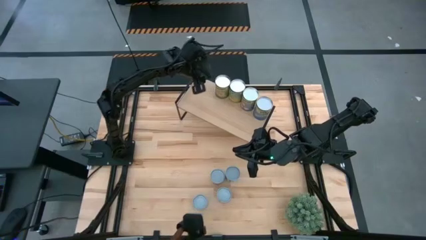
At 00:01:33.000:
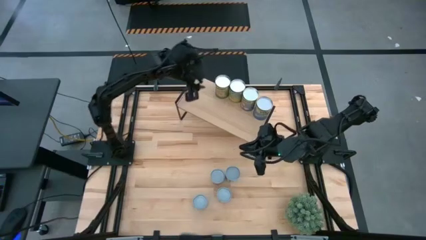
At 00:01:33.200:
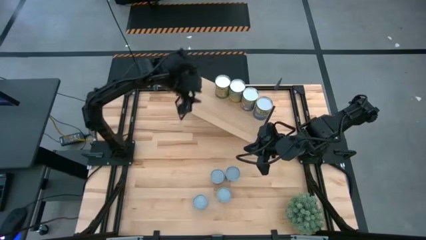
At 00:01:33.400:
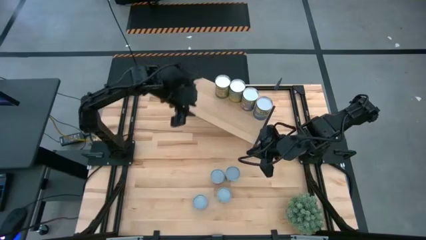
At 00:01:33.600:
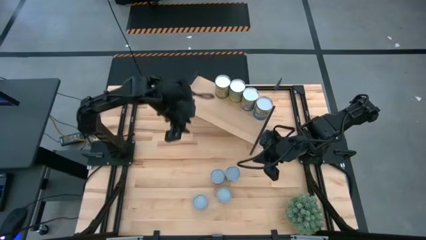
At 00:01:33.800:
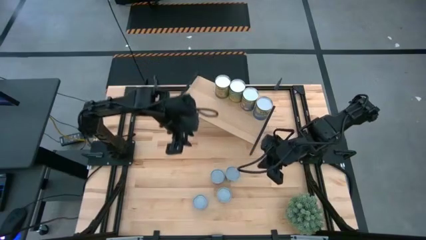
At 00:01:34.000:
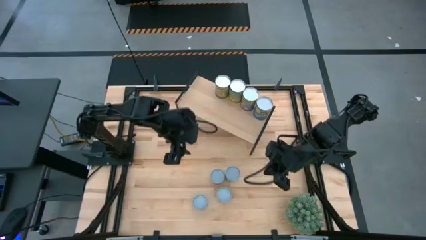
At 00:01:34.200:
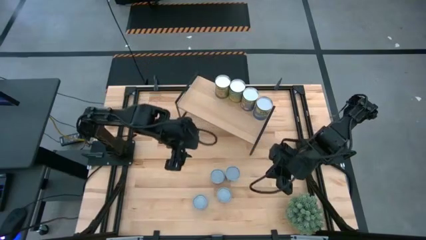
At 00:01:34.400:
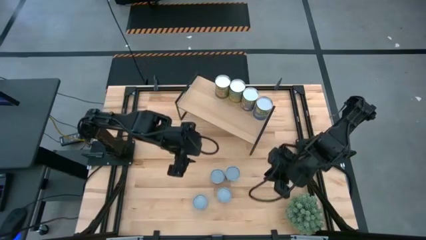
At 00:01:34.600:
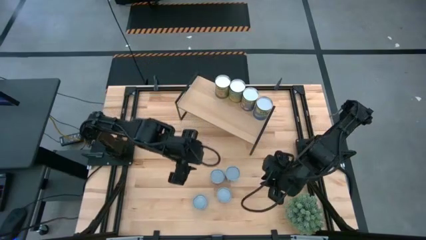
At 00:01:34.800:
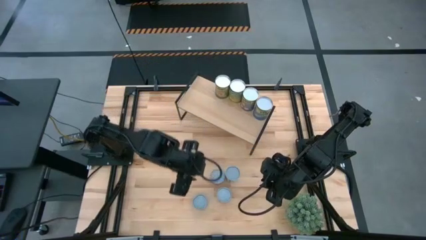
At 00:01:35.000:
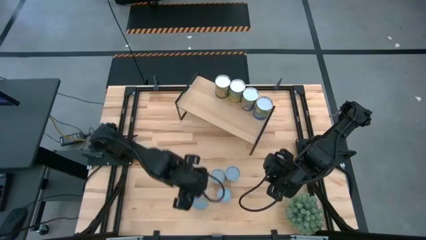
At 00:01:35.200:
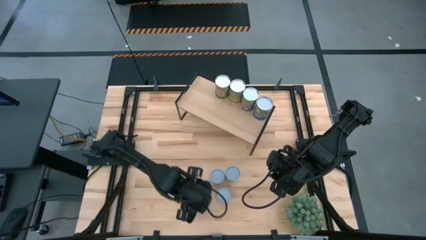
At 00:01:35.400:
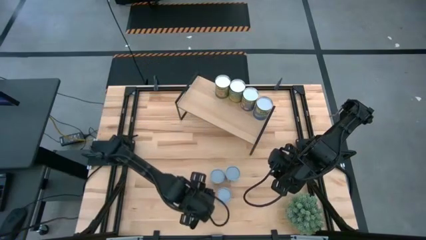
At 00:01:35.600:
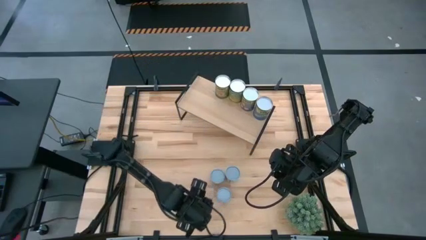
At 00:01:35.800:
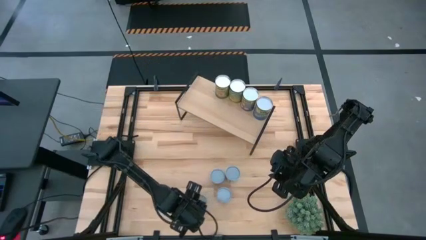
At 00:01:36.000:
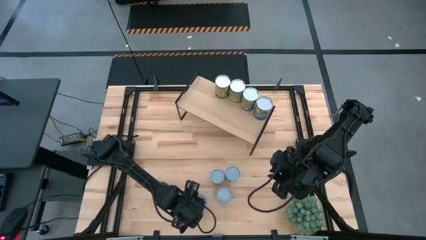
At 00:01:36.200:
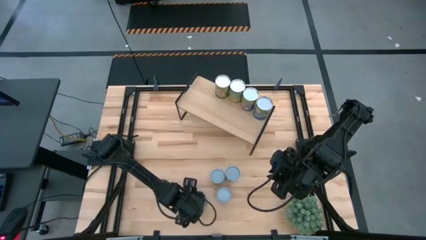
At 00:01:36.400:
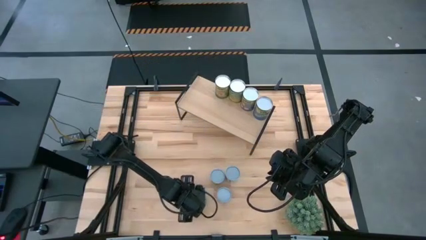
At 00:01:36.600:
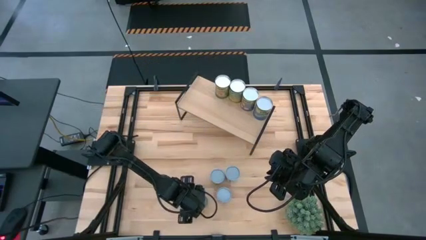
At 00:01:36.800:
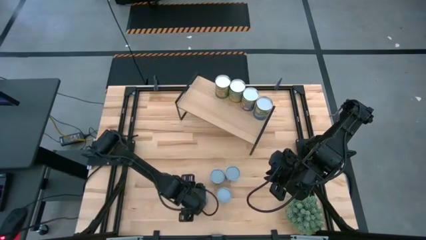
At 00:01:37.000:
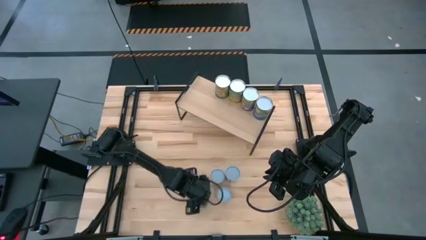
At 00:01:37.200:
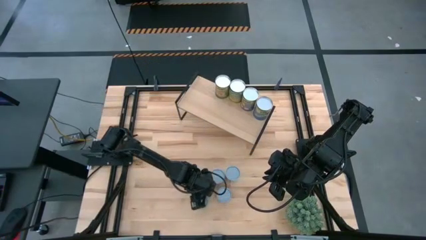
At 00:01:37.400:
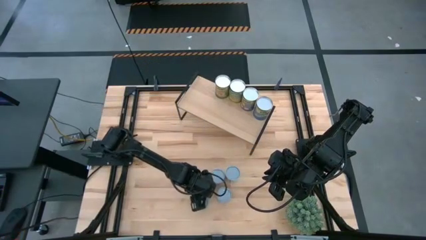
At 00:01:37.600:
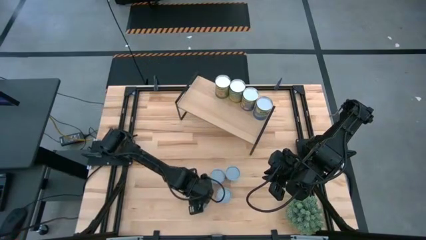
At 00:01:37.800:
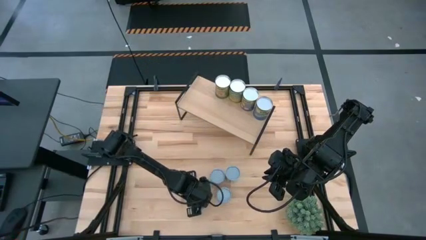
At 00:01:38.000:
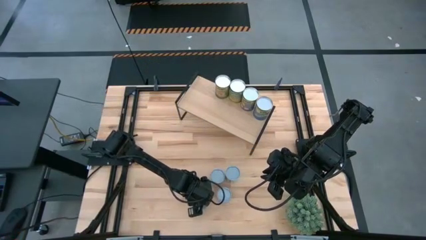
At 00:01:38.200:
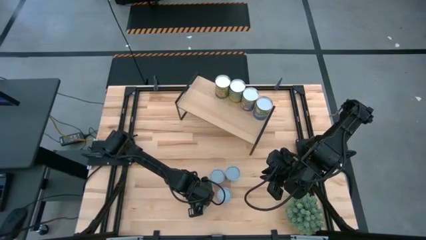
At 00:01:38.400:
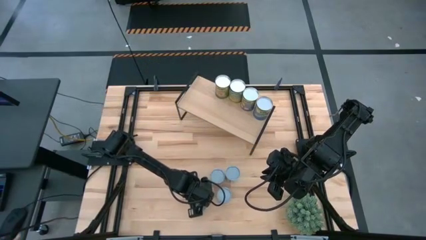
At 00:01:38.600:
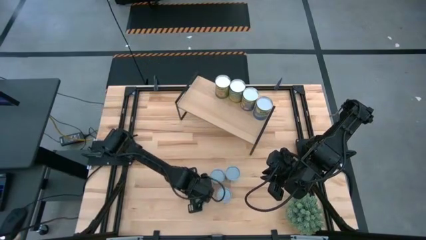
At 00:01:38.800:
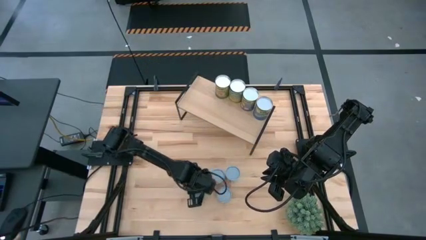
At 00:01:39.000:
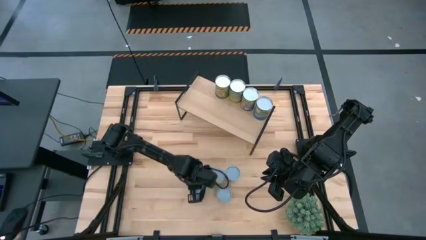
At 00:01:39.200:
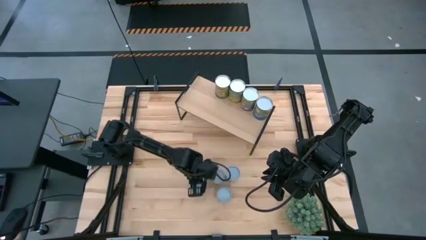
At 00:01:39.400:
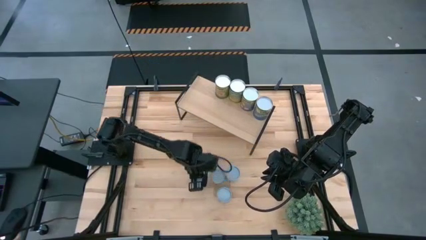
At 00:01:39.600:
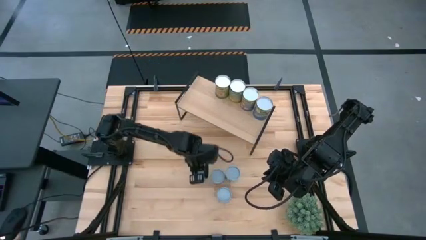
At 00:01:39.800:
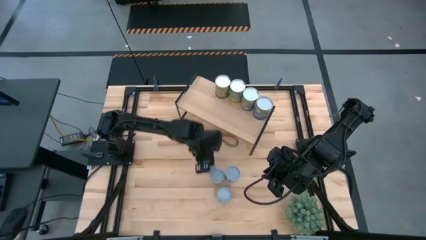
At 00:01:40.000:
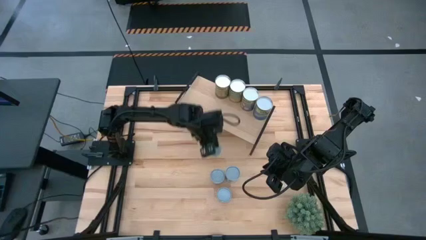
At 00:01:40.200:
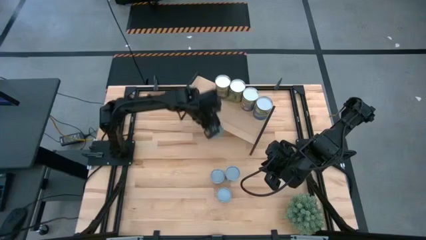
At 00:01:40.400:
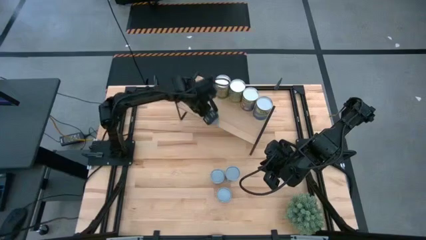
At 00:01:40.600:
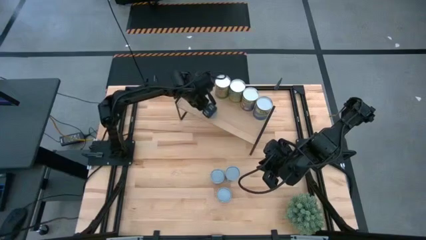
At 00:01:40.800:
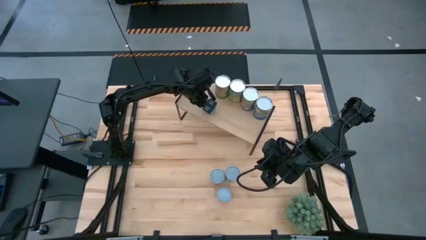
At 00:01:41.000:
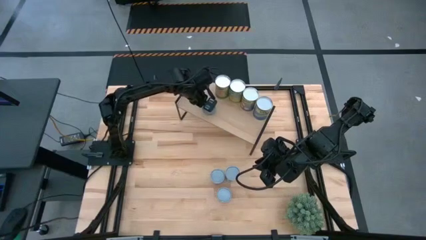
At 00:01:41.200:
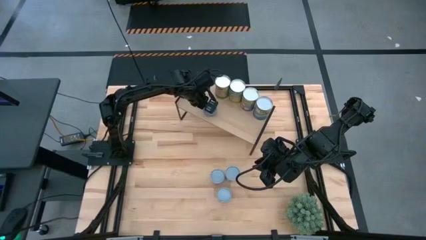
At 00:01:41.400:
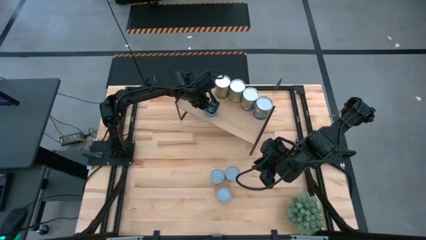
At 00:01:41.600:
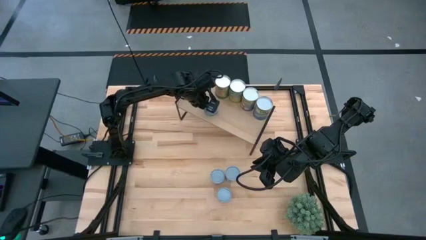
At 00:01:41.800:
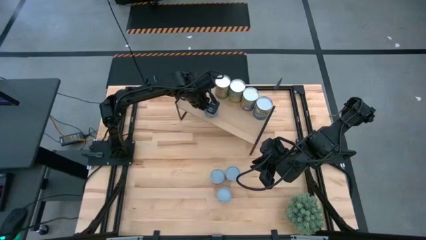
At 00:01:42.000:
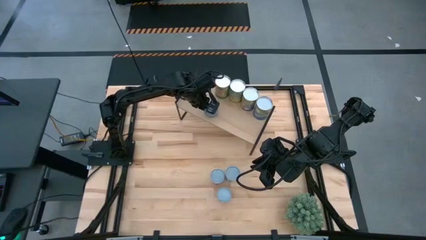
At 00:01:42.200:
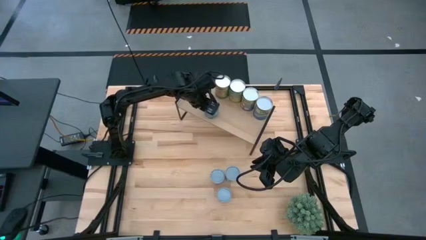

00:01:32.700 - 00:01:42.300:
Task: Pick and place cans onto a shelf
Put the blue tuna can on the shelf

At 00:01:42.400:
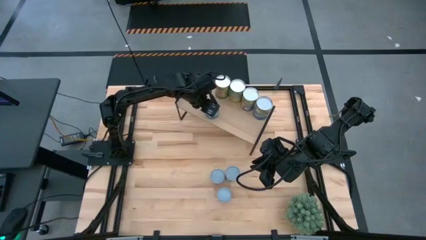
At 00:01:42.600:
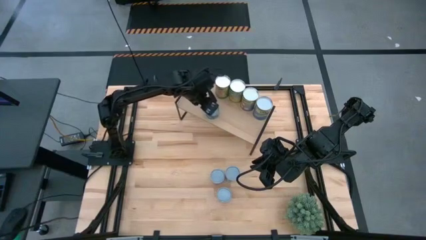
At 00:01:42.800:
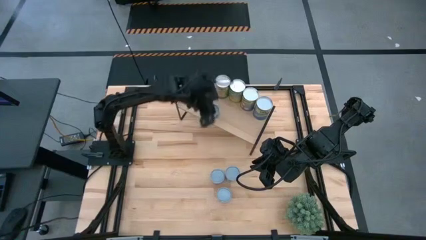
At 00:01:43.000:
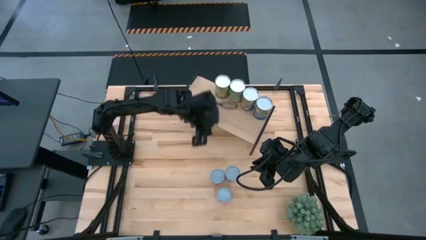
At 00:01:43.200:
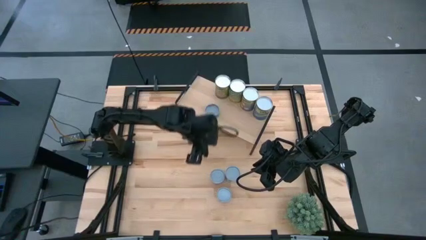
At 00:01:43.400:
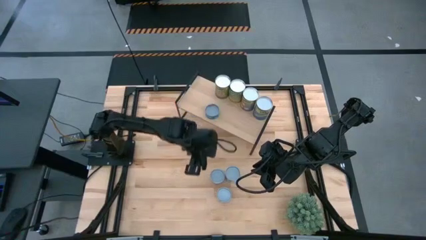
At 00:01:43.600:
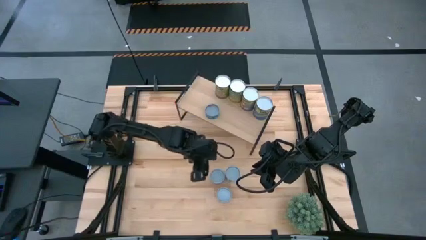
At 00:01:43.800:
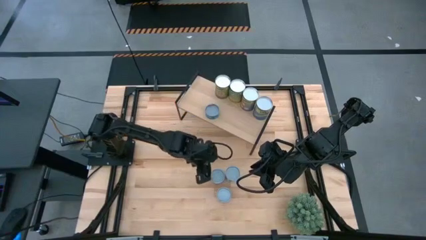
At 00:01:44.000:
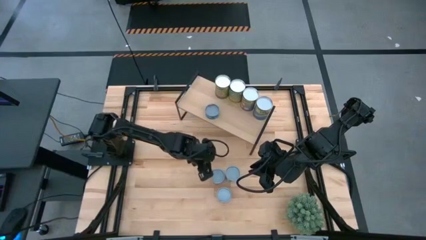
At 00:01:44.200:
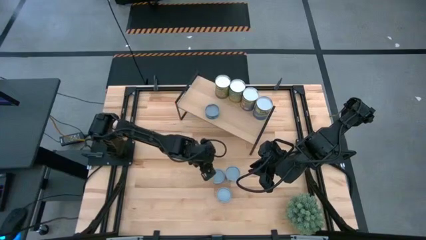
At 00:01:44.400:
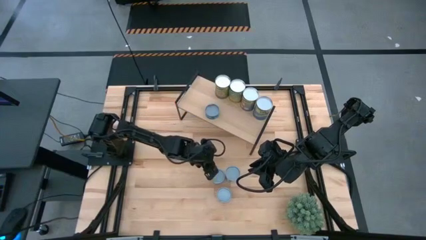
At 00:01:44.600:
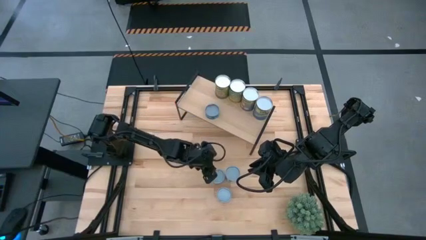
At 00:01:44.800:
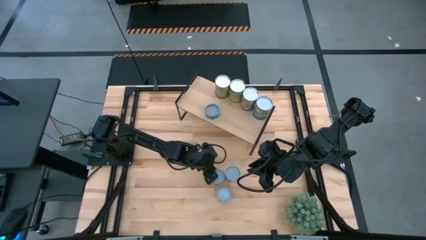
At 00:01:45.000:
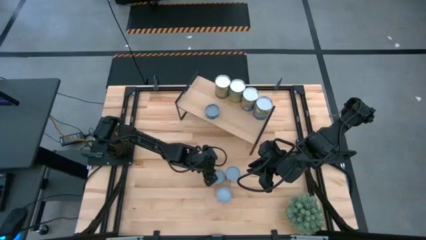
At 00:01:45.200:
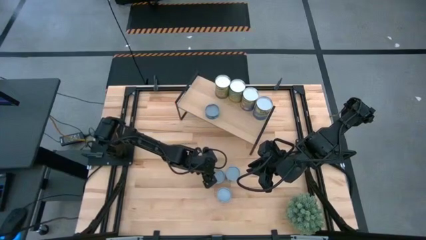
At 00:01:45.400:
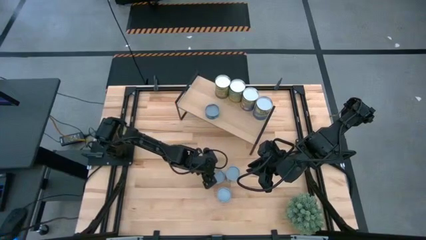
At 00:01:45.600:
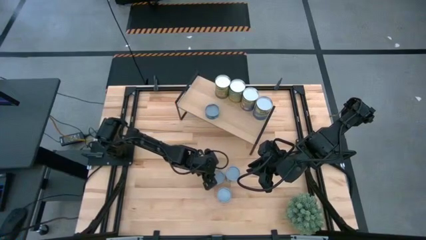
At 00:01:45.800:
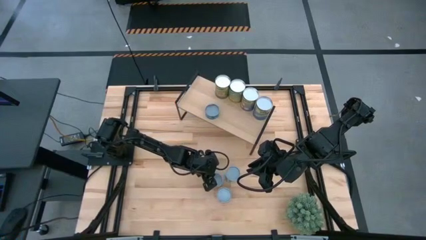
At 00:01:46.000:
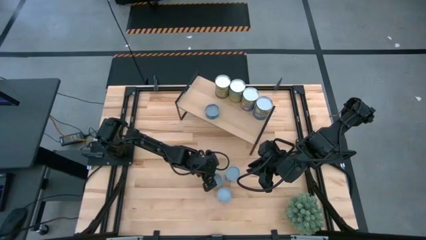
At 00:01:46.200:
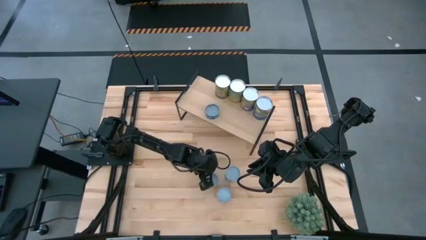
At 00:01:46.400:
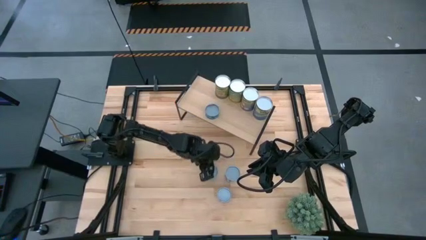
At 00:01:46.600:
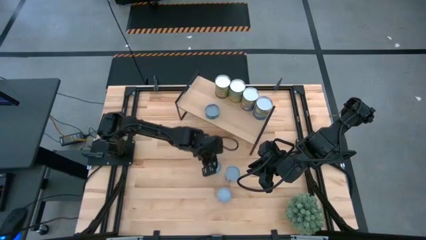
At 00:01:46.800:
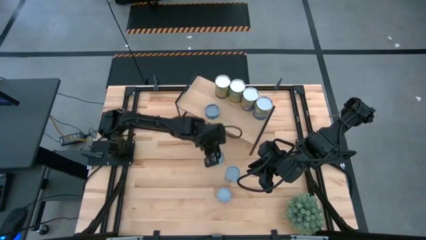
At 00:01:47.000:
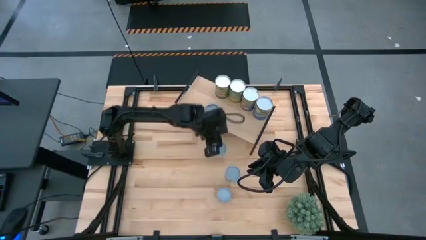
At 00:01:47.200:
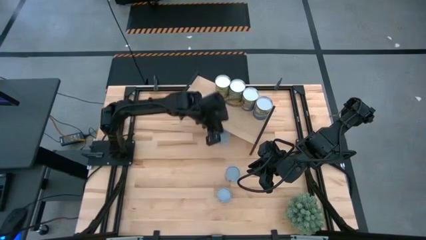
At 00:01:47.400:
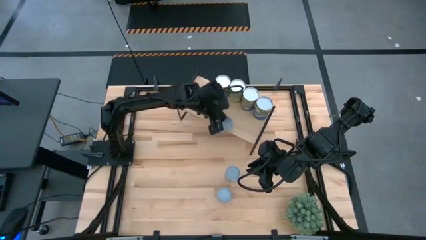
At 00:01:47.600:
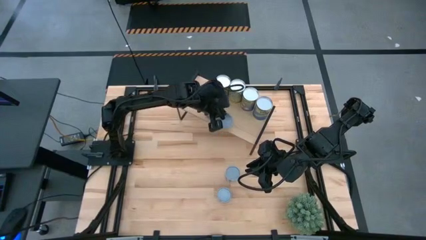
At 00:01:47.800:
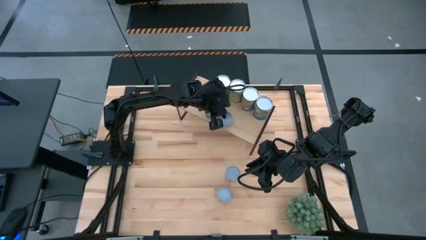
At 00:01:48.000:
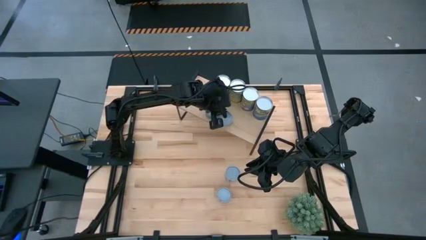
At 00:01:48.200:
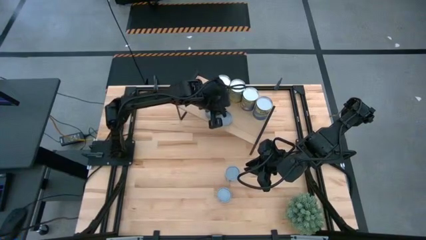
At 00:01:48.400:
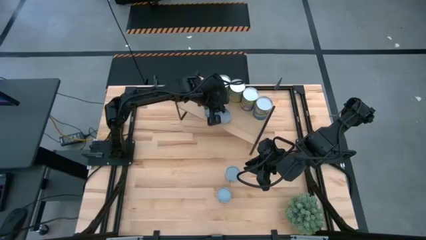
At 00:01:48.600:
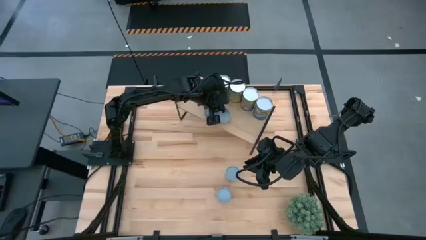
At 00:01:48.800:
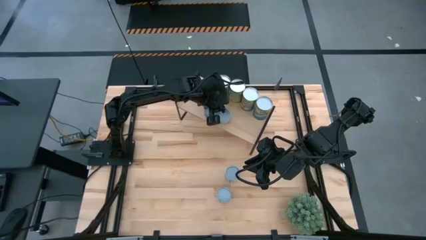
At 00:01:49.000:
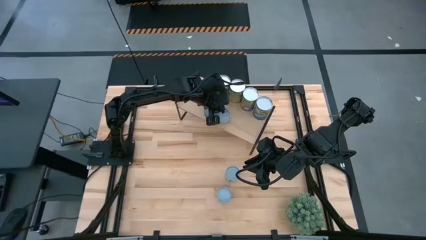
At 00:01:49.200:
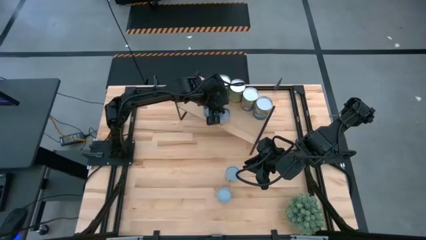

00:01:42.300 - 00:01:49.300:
Put the small canned green peas on the shelf
